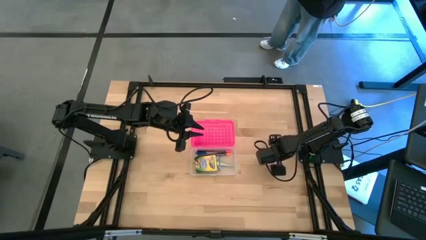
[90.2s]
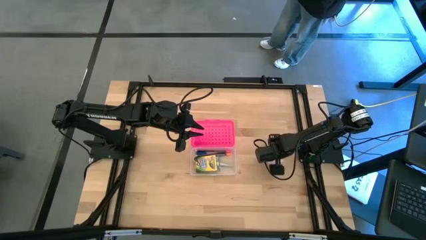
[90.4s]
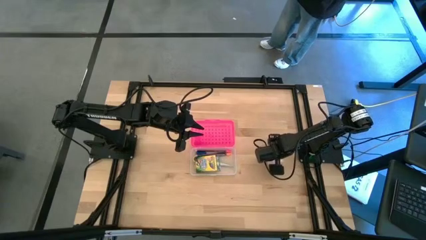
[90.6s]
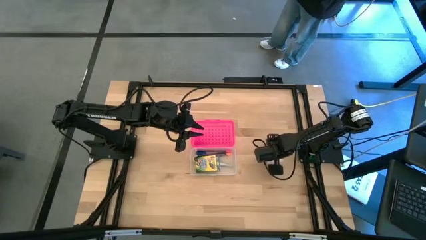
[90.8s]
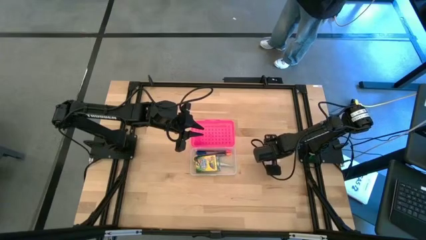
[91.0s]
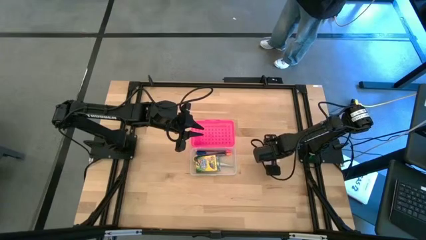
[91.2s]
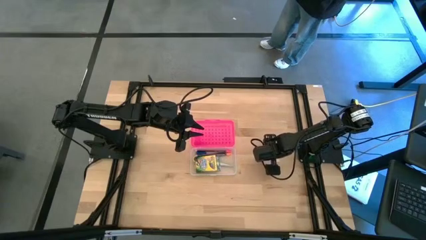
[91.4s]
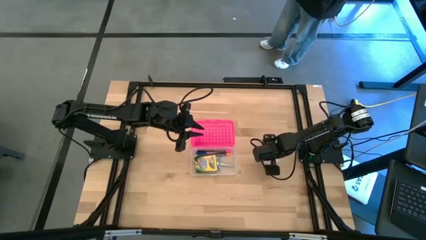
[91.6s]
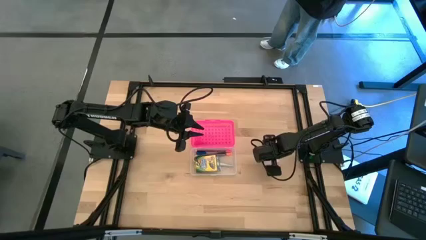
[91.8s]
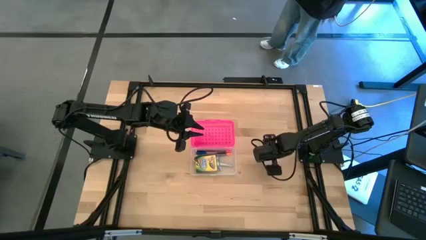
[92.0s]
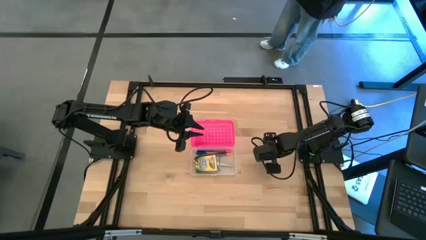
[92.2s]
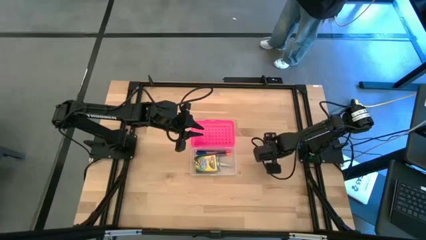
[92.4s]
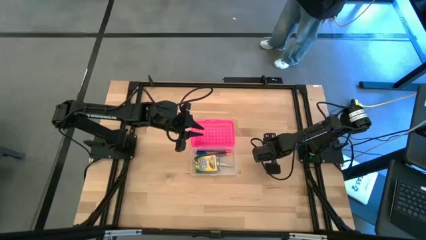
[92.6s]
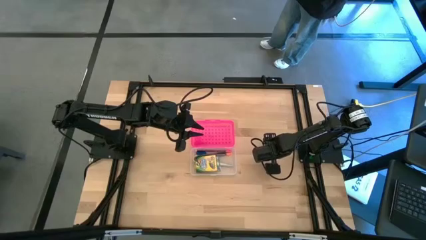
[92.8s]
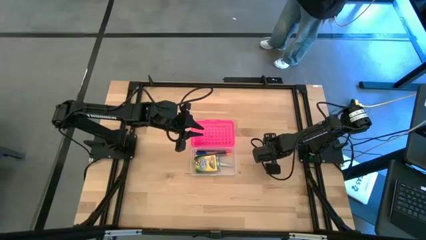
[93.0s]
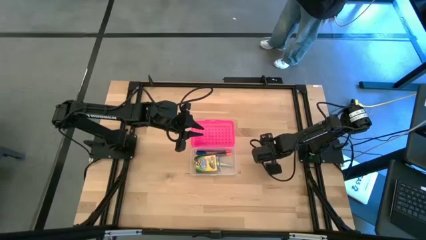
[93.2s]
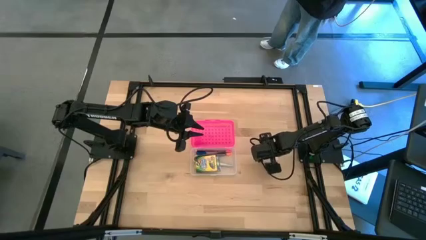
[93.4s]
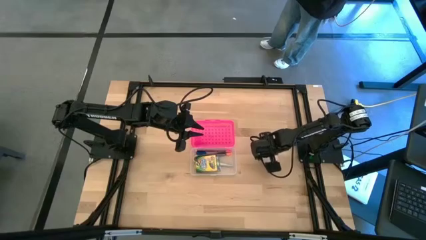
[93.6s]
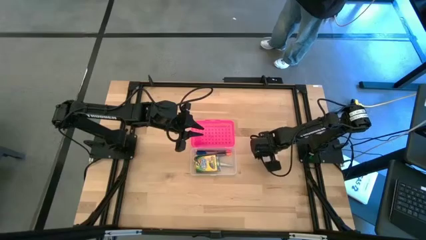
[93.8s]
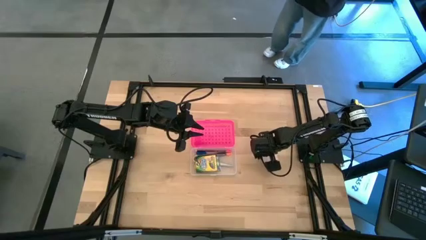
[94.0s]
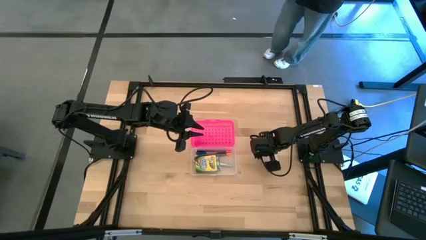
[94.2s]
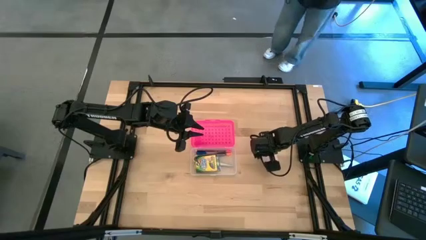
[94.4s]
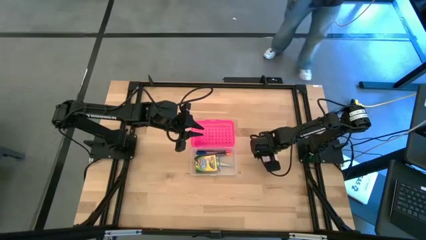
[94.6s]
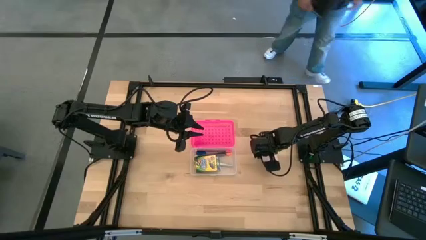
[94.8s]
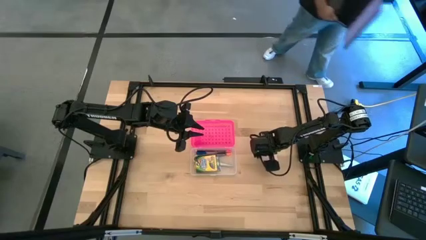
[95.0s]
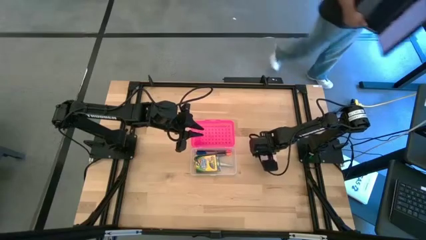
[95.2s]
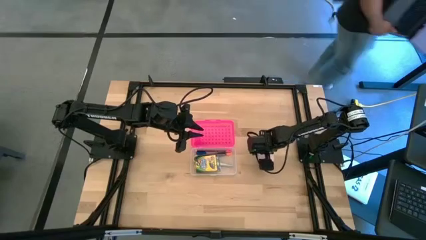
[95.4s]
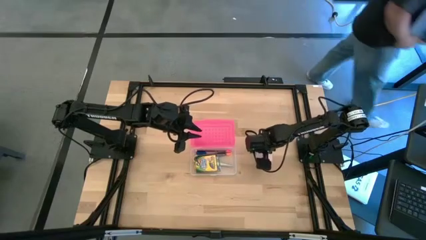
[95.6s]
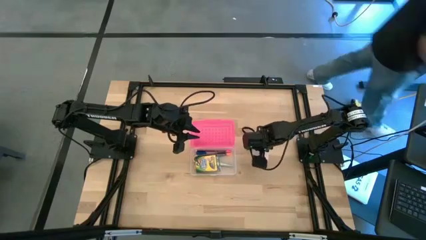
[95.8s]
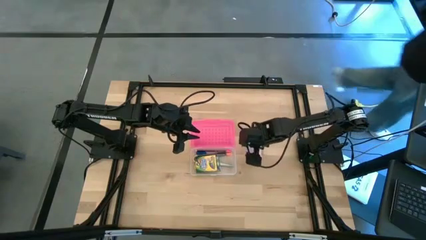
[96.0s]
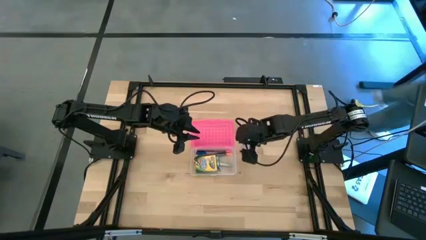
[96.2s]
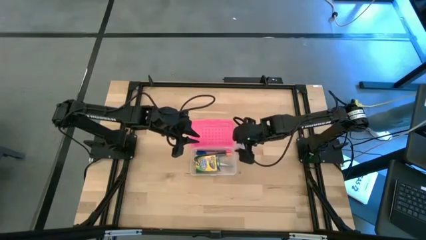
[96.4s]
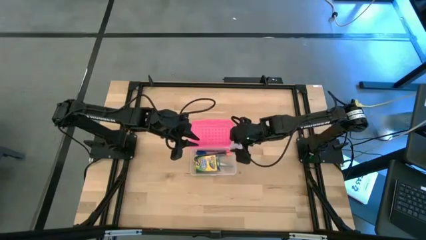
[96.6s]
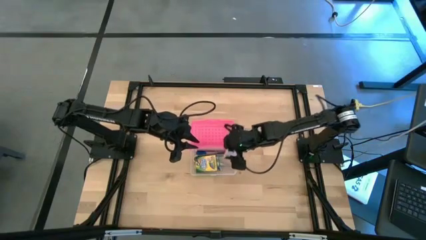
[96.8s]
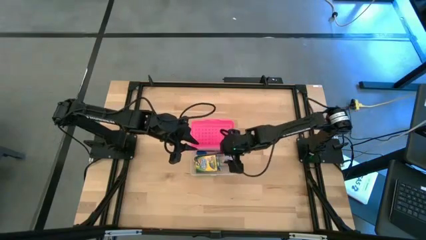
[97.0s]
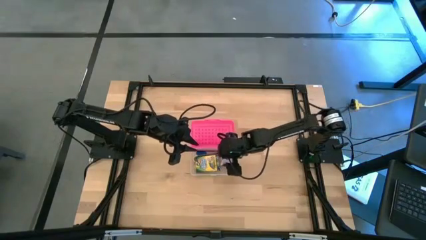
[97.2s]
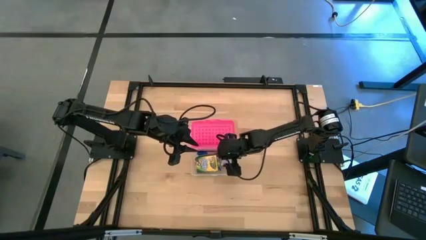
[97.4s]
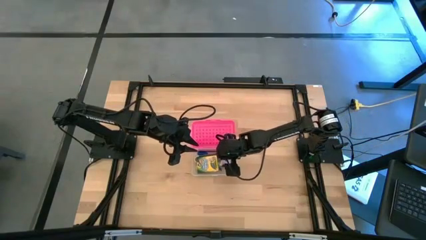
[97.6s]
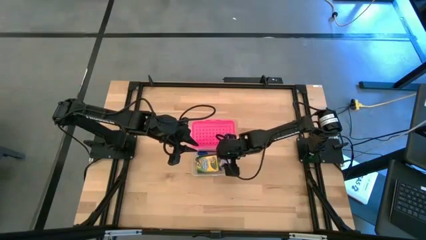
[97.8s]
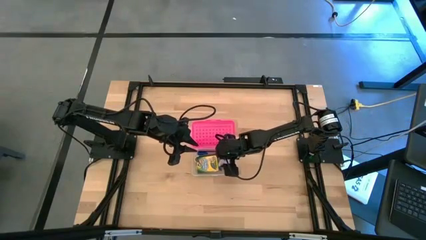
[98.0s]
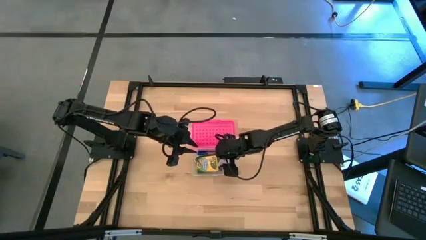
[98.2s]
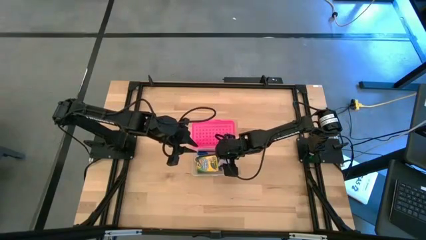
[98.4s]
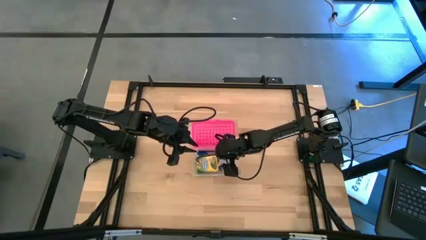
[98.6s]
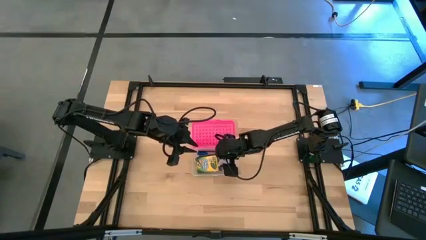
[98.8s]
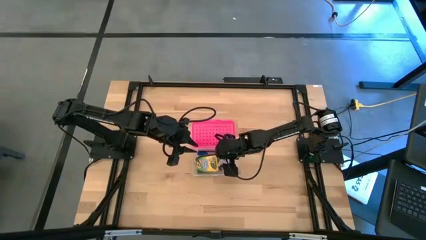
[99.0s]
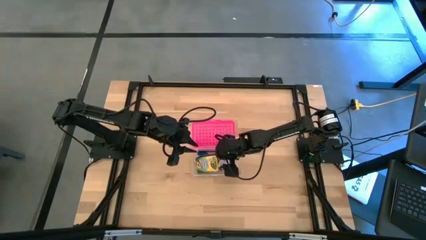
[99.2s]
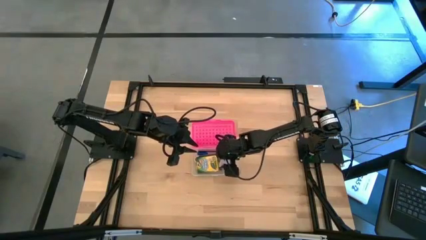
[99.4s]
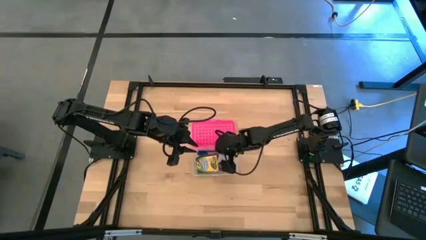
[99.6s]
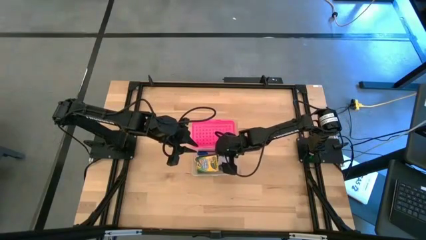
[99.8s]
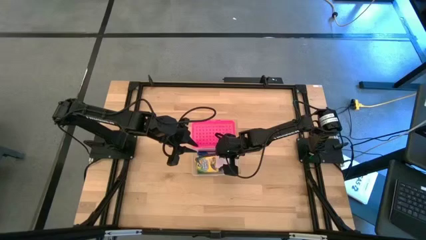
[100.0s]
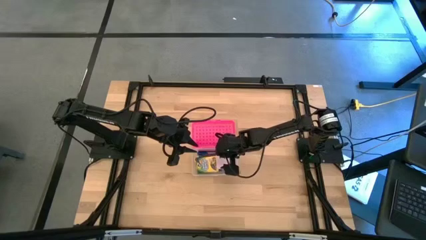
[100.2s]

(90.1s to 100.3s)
Task: Pack school essentials
Put the sticky notes into the pencil case

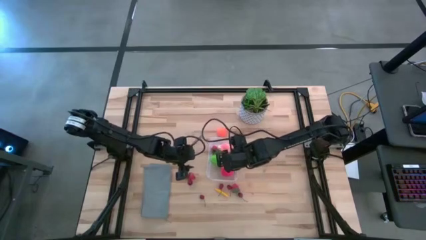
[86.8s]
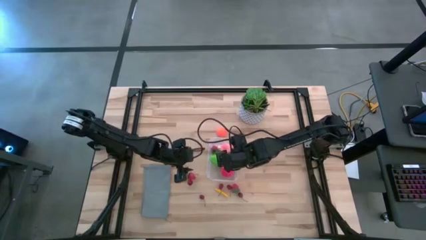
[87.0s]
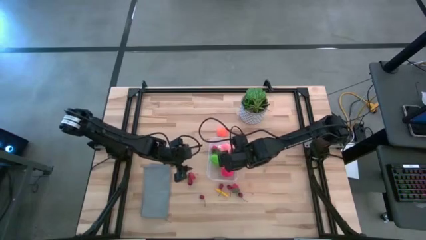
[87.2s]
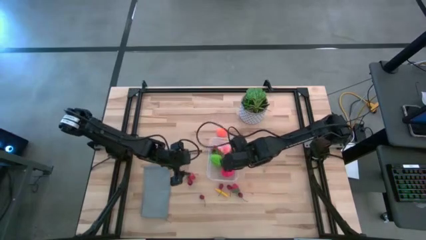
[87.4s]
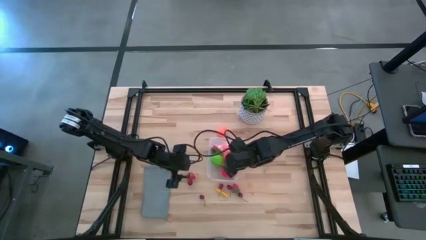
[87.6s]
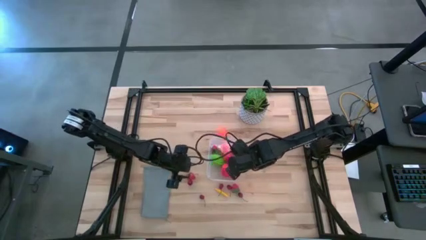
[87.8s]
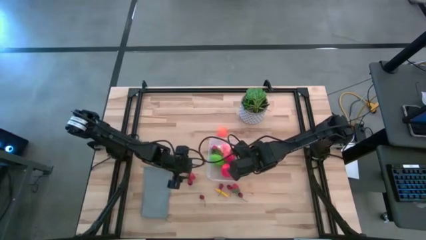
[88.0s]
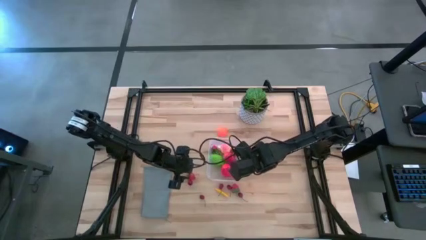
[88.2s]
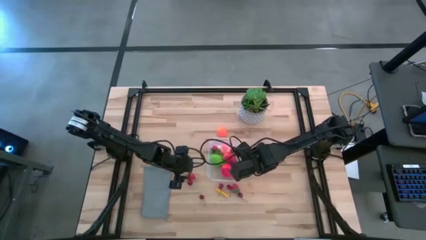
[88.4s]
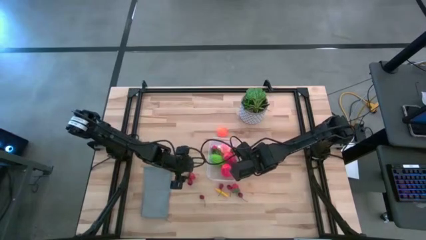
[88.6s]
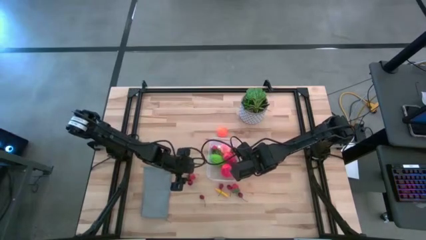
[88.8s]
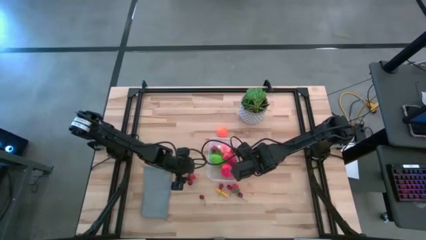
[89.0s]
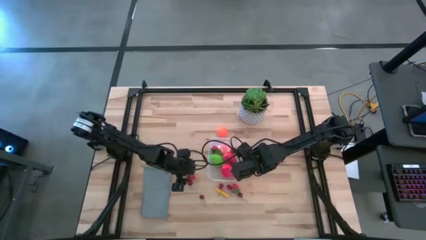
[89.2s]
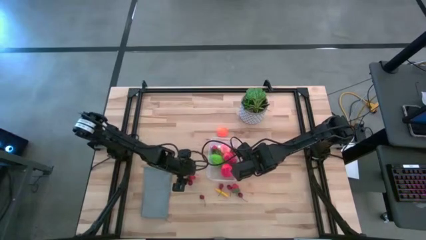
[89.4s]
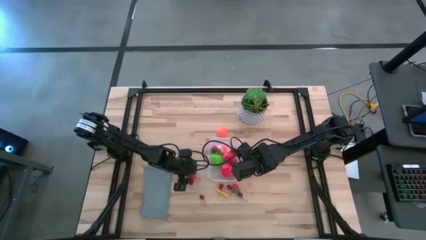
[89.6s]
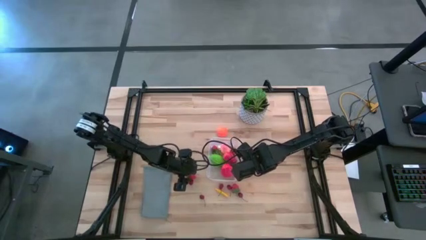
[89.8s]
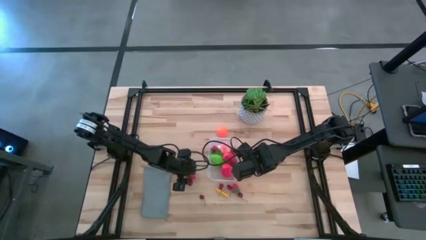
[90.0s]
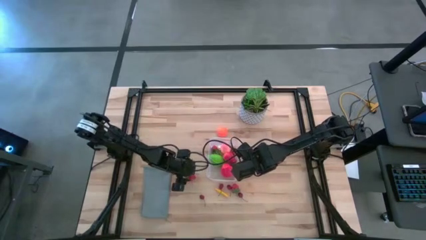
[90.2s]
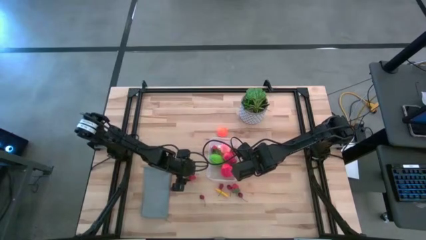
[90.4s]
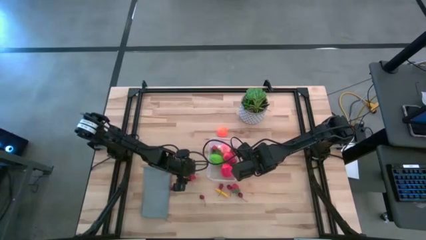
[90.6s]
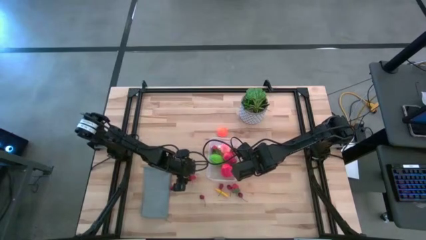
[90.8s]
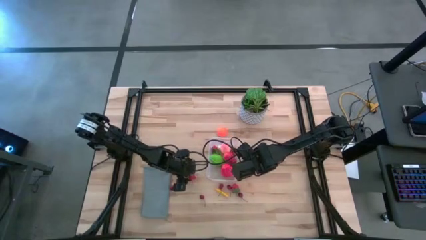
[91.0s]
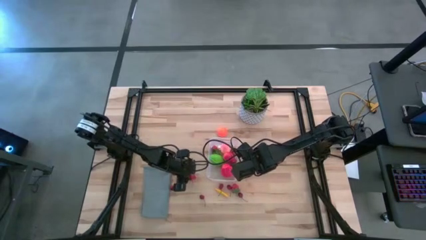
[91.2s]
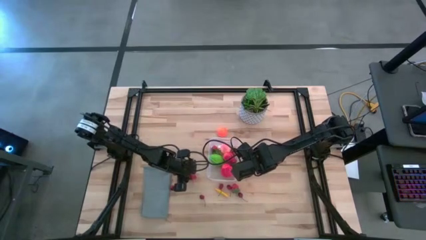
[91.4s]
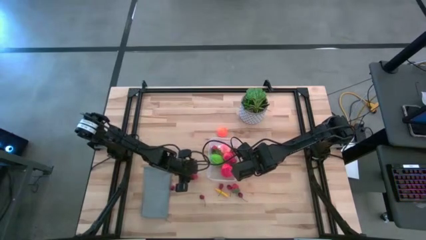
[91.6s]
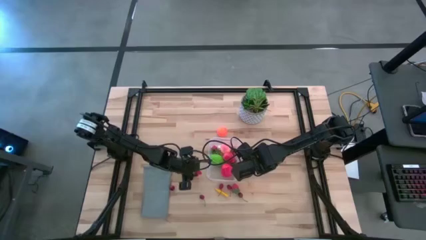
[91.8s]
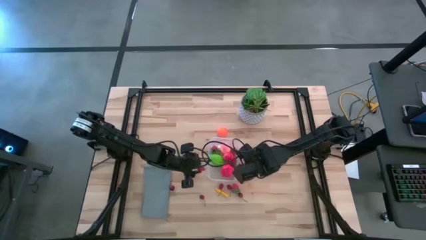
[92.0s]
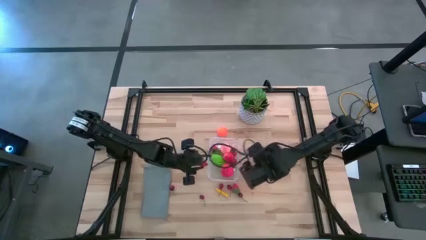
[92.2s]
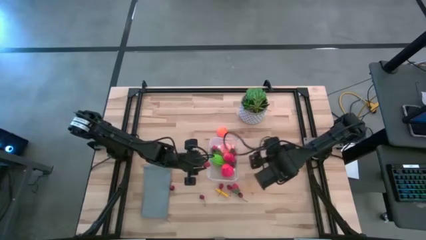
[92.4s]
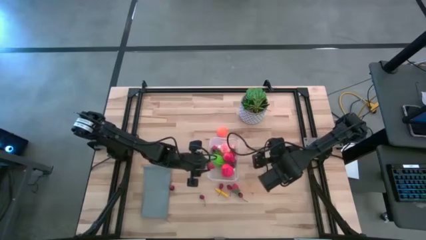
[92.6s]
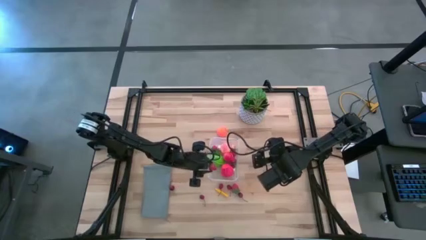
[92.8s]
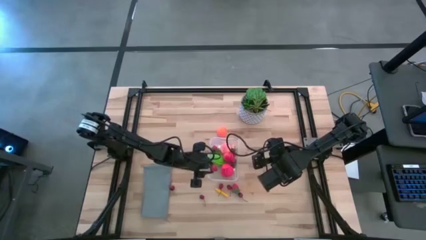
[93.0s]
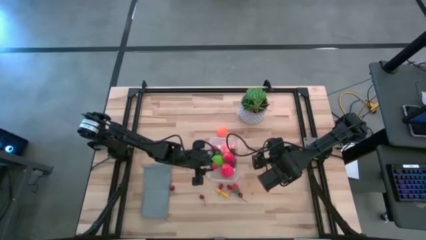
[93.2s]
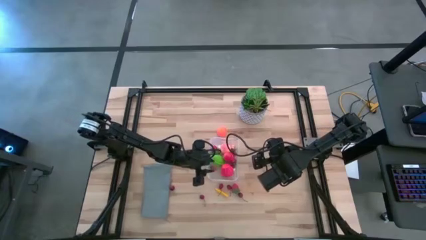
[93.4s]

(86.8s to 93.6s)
Task: Pick and placing Produce into tupperware
Put the red strawberry into the transparent bin
